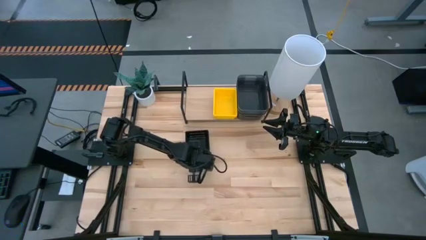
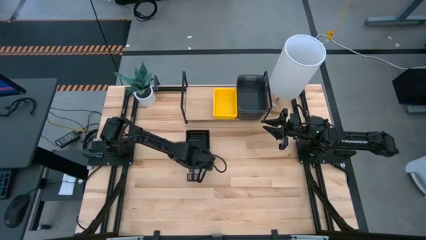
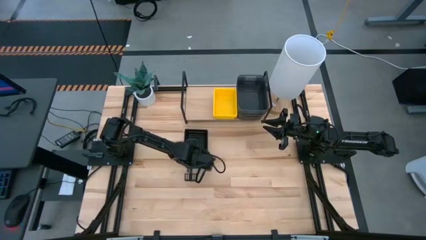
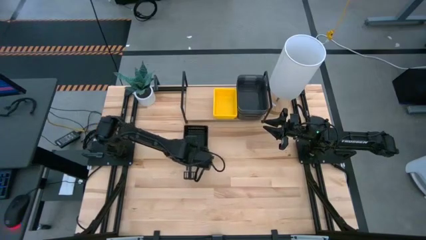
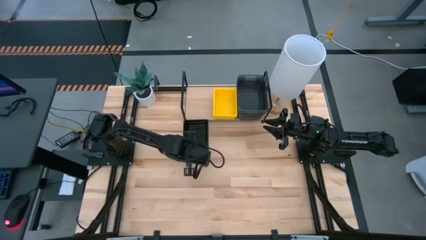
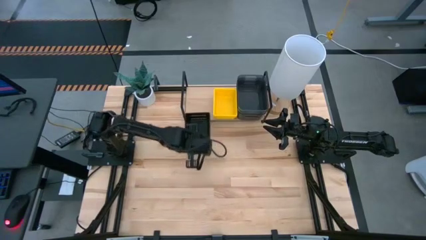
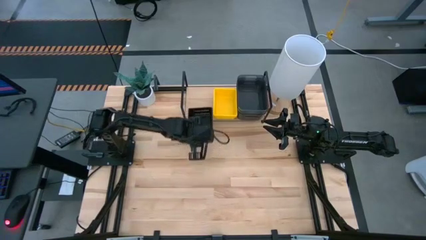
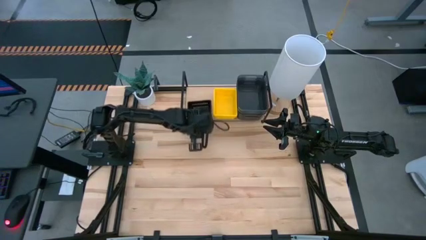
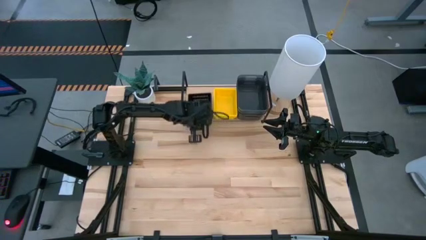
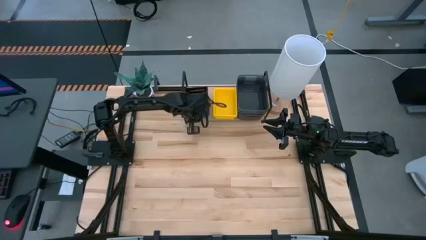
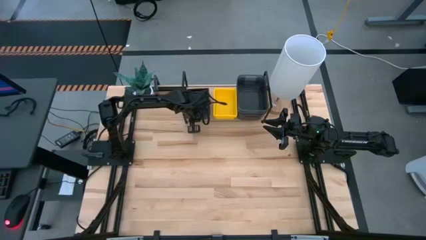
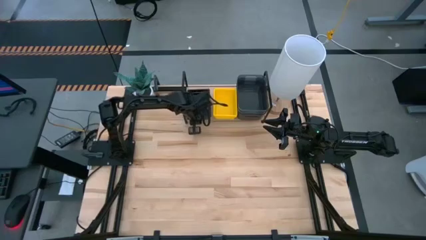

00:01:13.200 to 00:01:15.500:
Task: Stack baskets on shelf by color
Put the black bin on the shelf

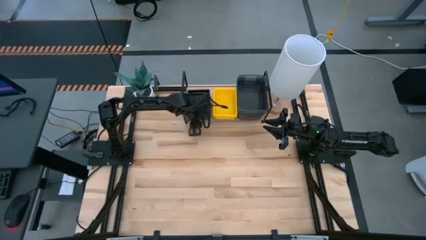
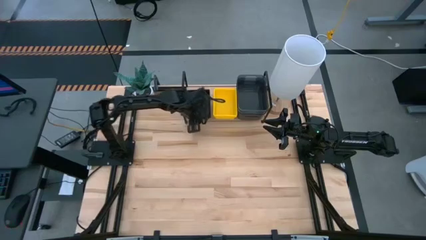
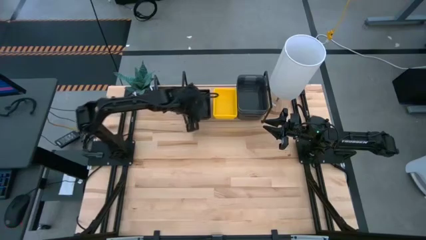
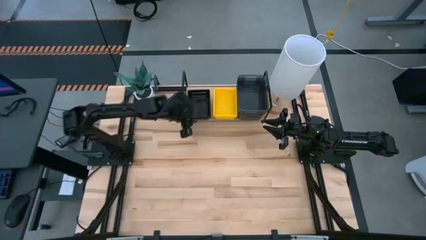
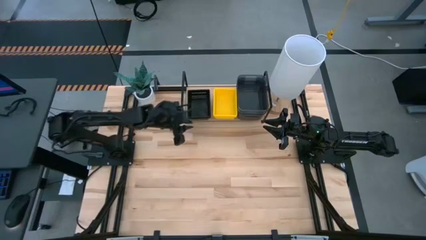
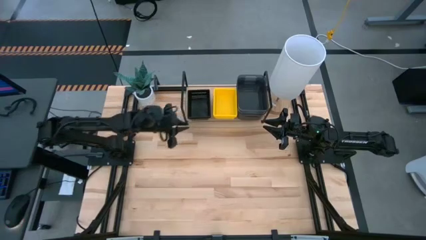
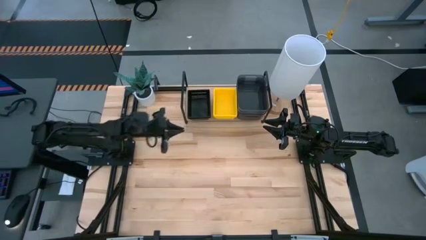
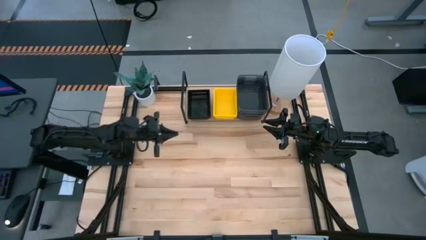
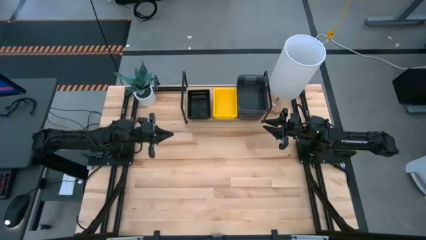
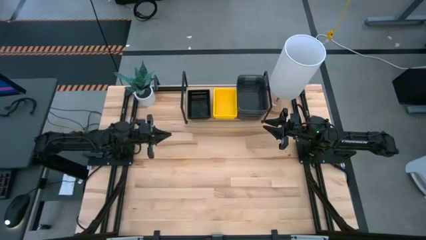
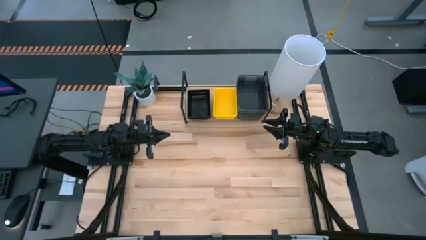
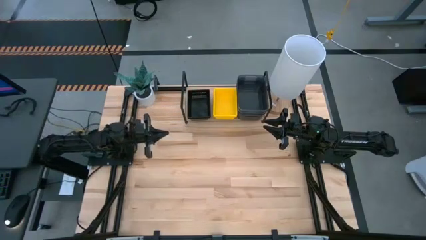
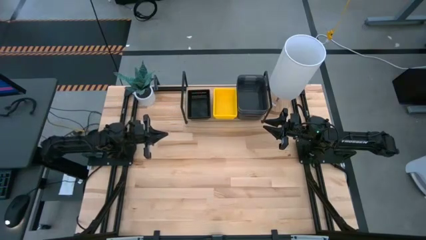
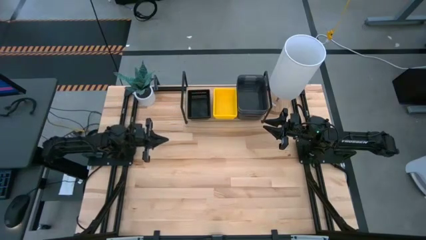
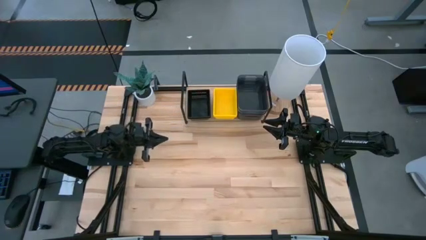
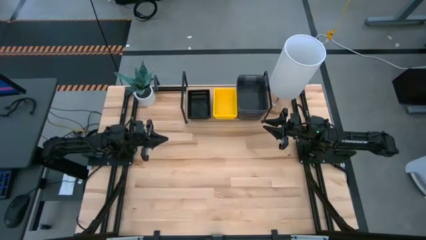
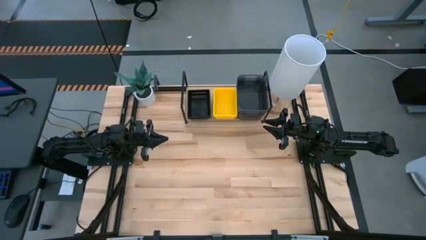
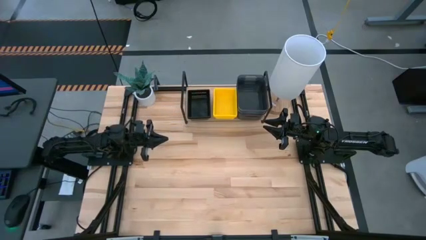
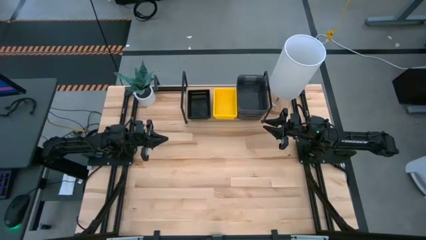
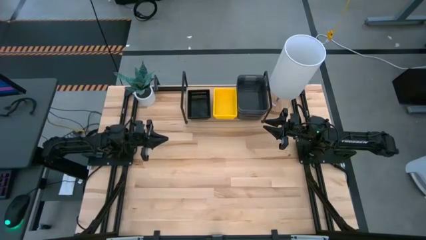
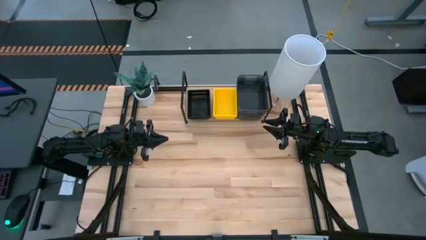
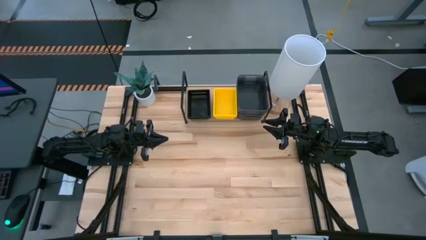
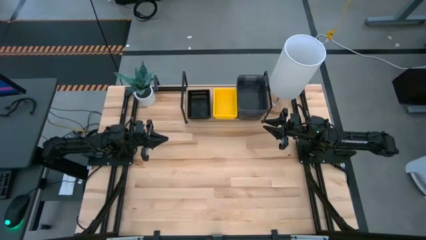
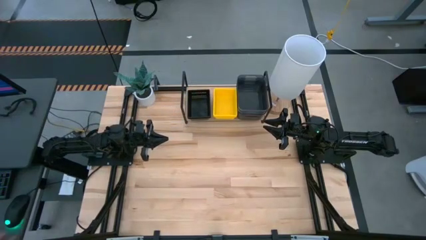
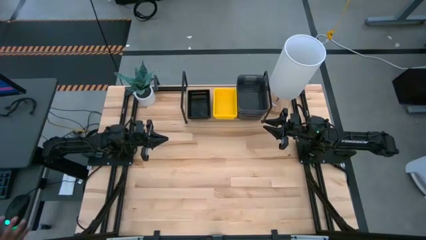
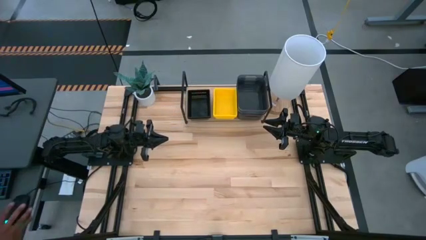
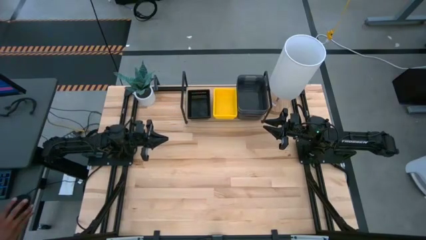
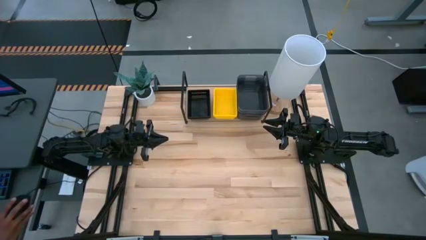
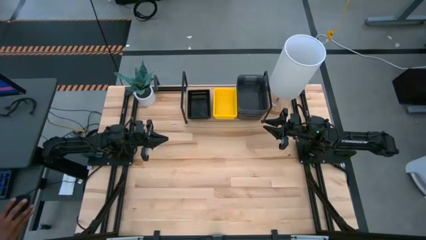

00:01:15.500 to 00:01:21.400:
Return to Home Position

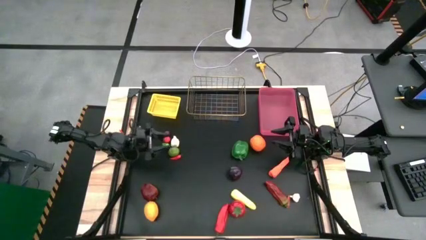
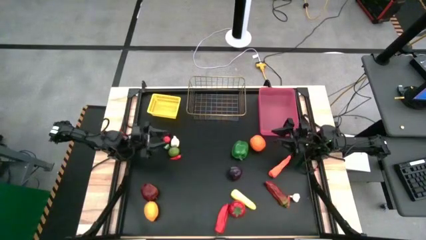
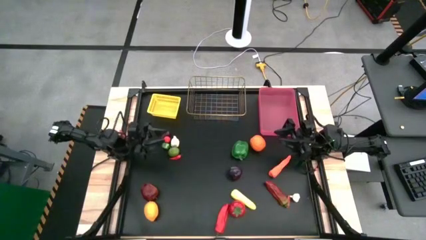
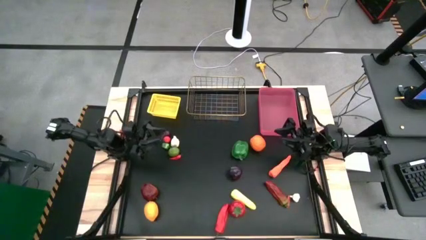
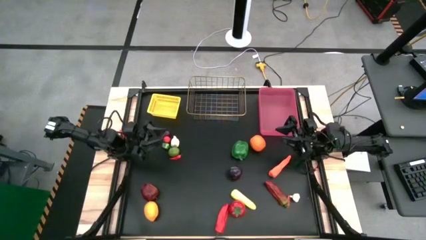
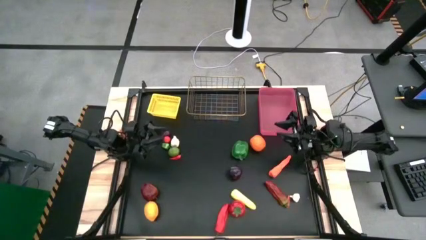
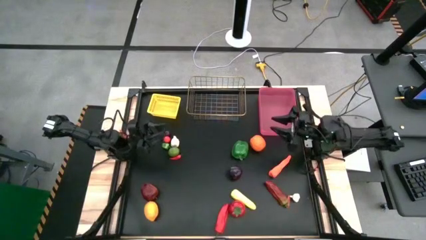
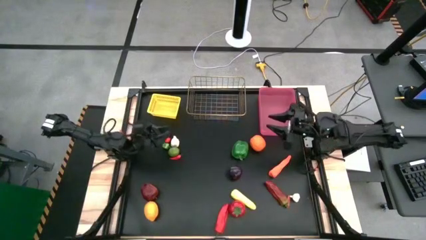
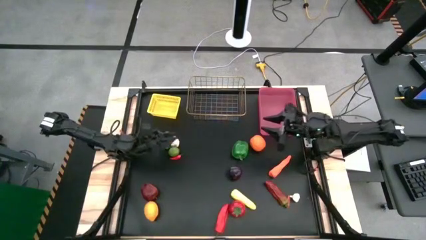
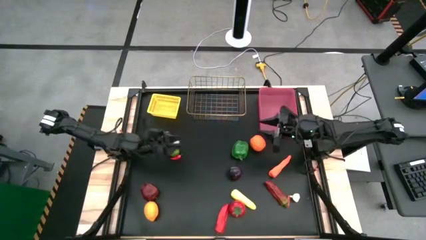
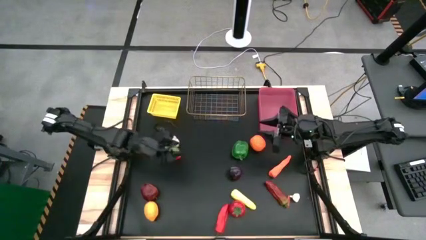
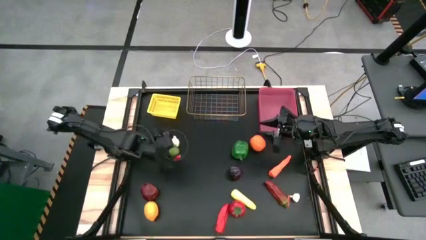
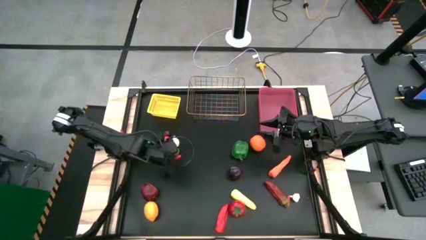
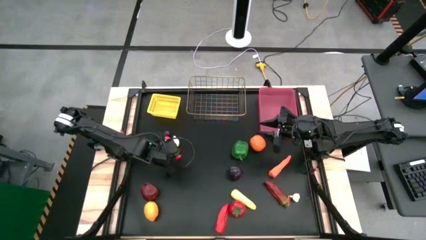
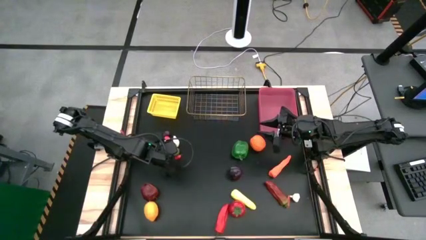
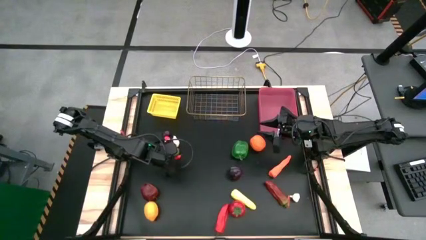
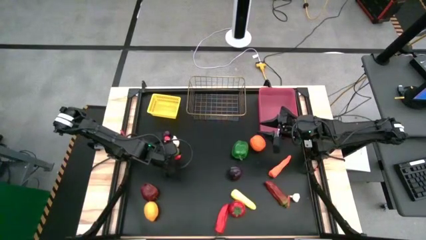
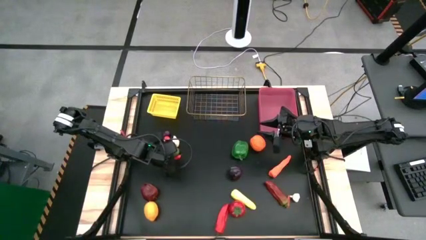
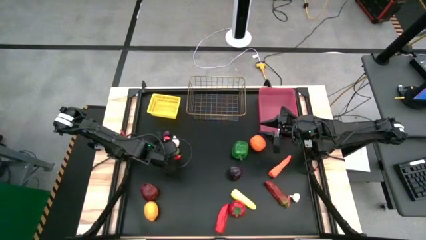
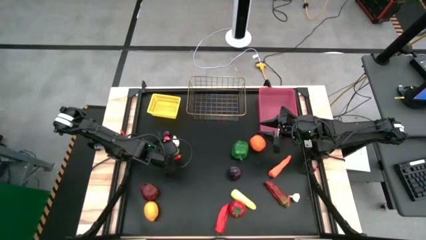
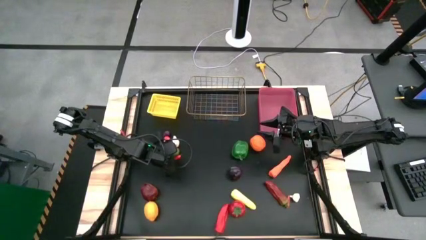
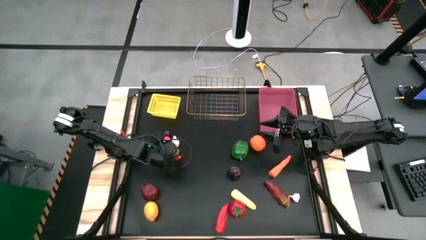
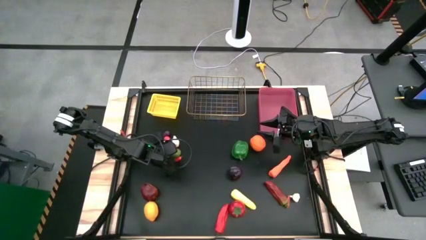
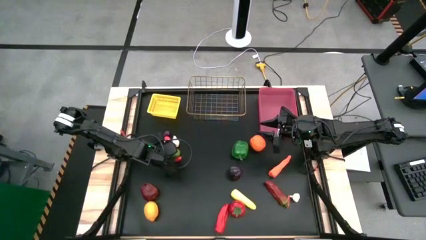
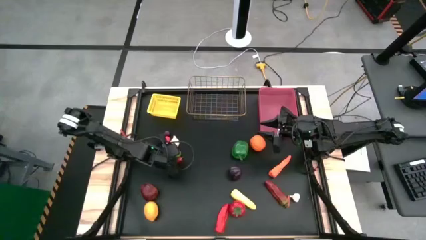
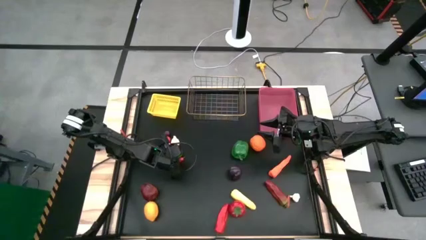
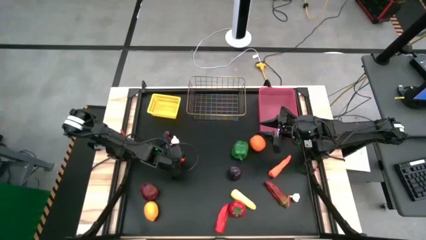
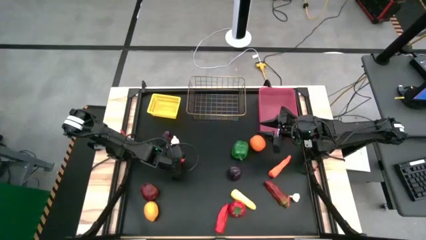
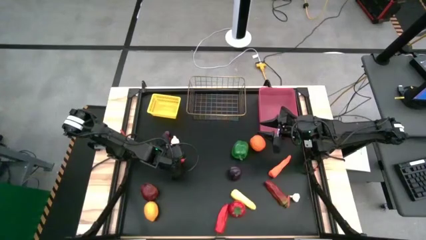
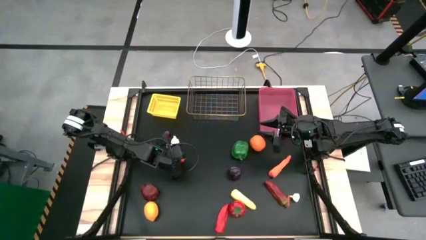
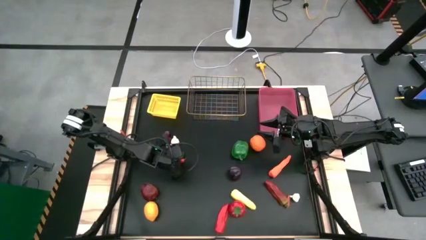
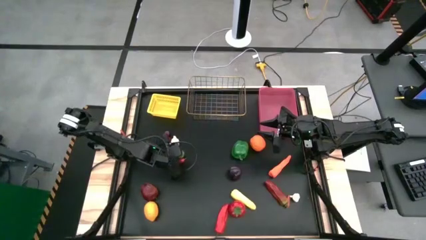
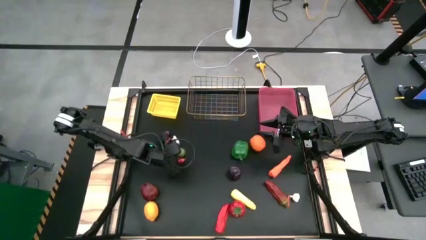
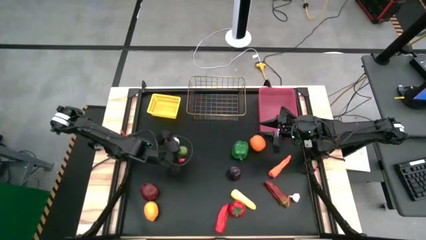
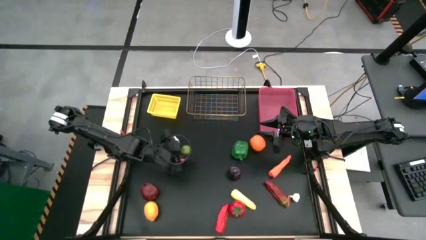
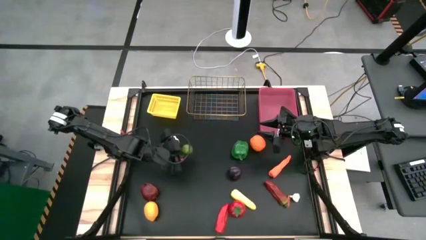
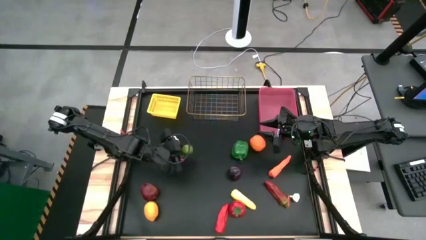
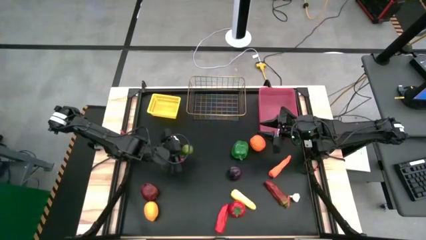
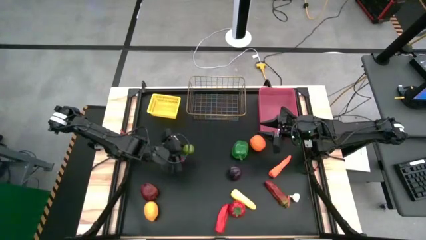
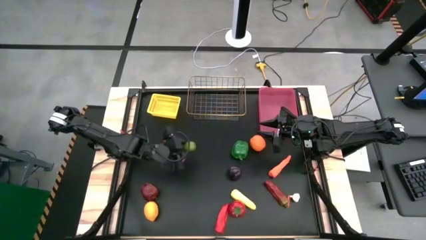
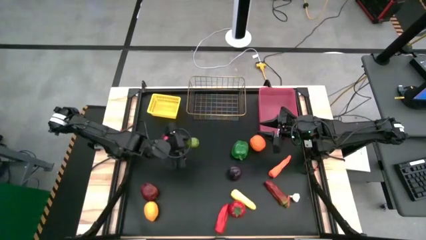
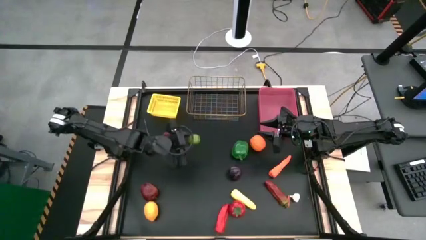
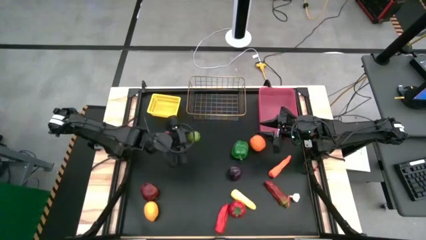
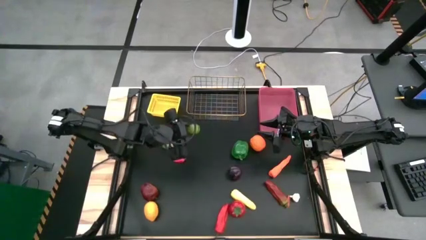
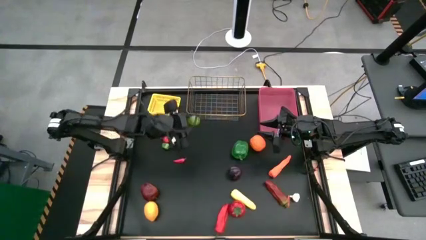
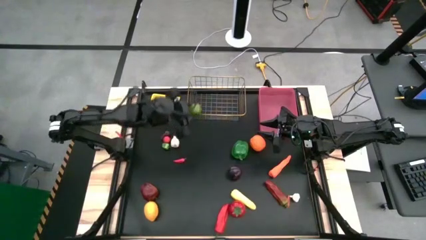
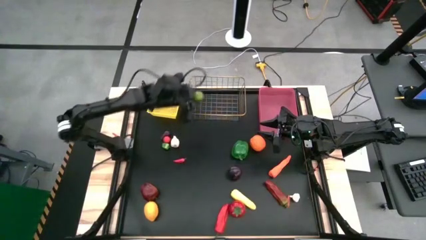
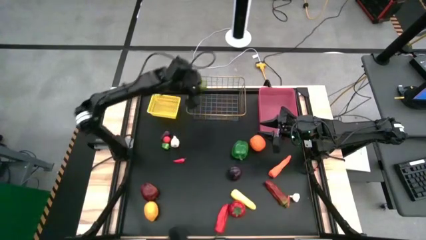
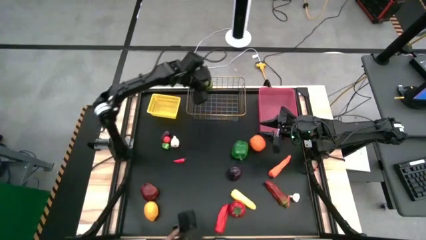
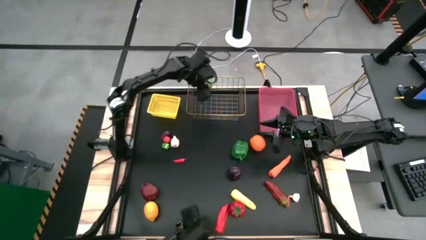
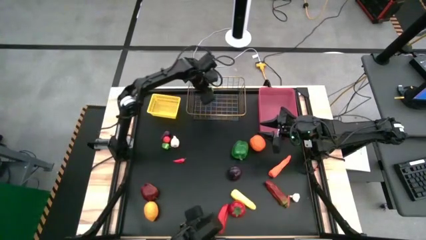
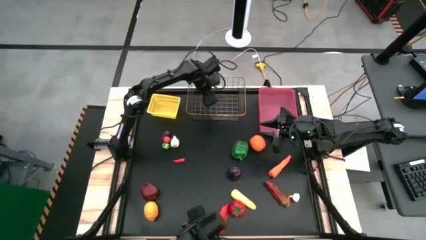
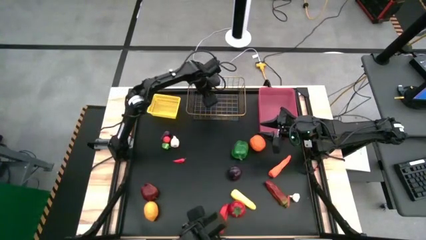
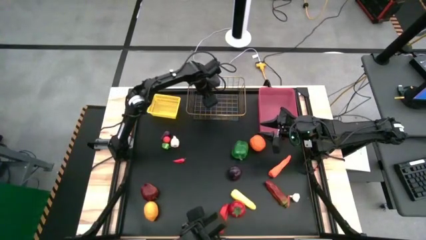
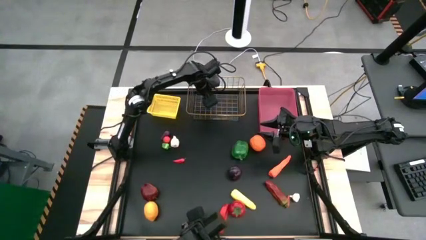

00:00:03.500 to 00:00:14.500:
Task: Sort produce into baskets
Put the green lime into the gold wire basket
